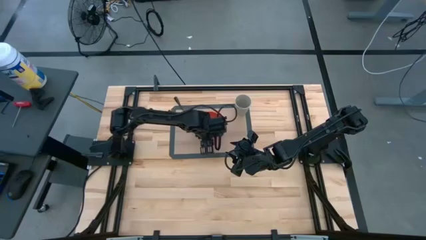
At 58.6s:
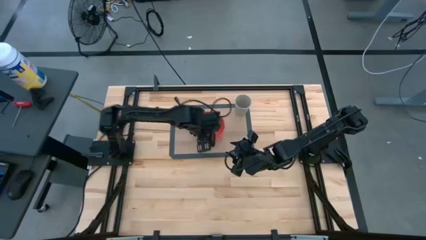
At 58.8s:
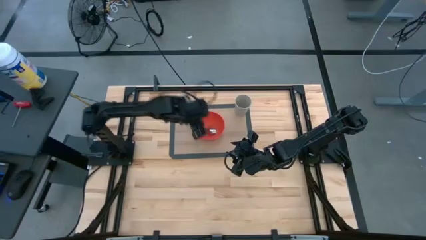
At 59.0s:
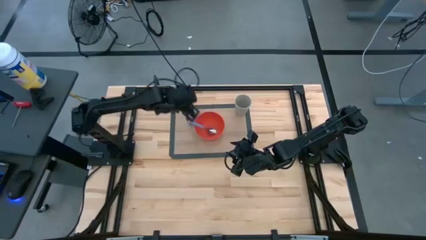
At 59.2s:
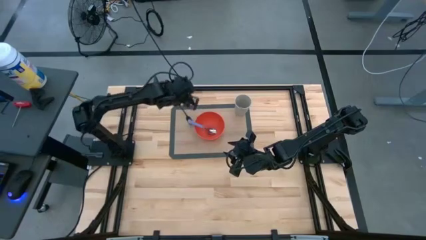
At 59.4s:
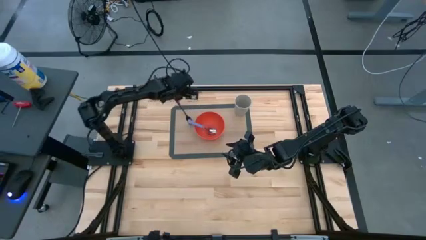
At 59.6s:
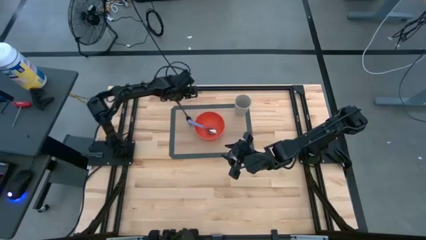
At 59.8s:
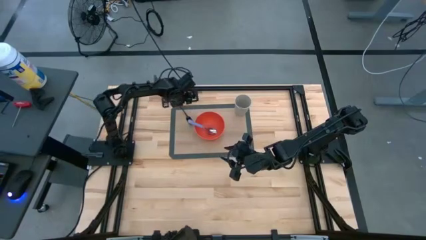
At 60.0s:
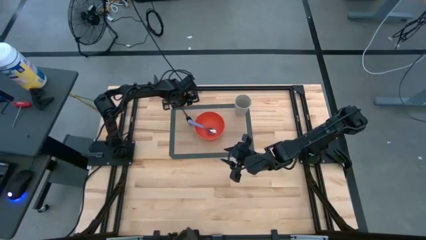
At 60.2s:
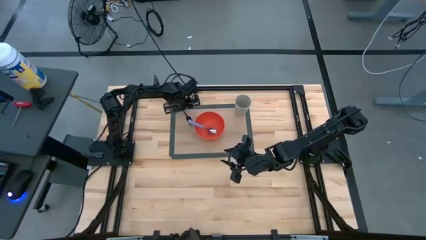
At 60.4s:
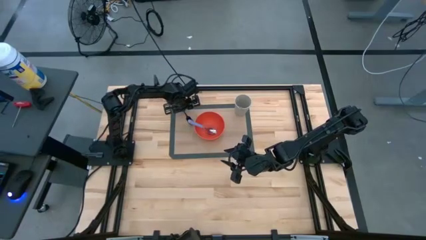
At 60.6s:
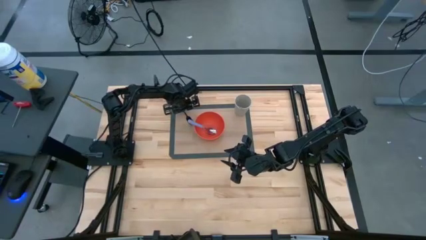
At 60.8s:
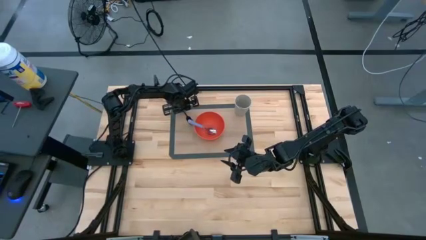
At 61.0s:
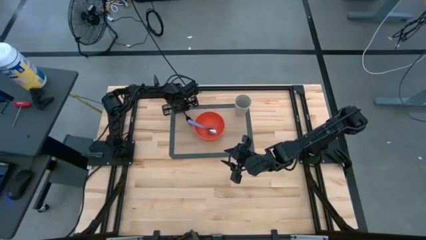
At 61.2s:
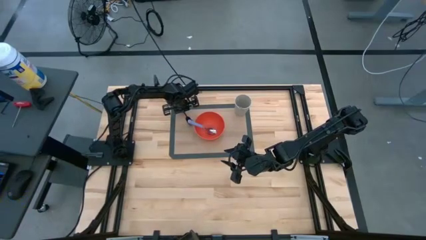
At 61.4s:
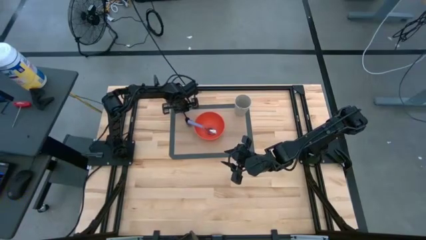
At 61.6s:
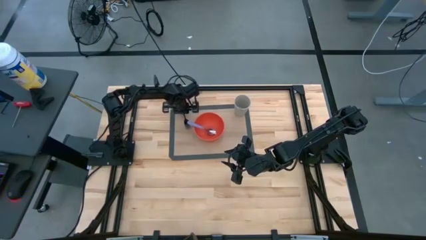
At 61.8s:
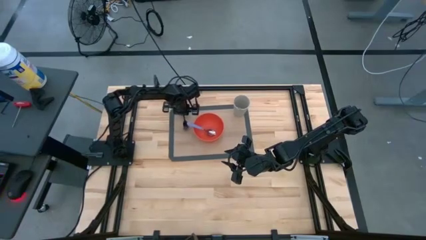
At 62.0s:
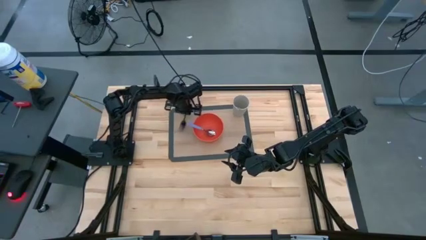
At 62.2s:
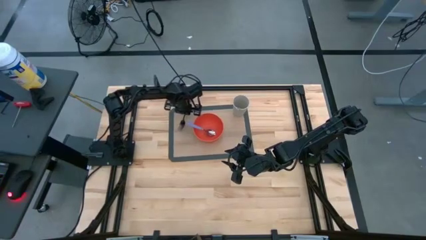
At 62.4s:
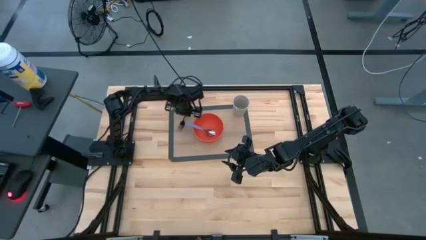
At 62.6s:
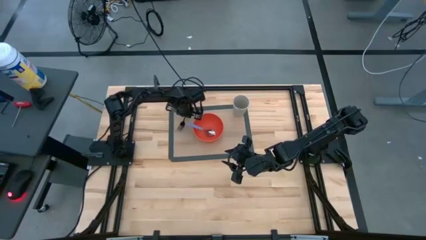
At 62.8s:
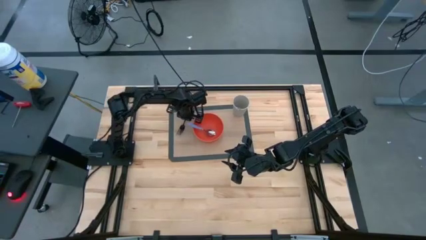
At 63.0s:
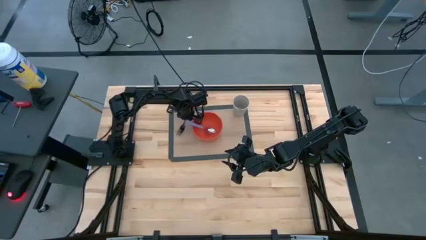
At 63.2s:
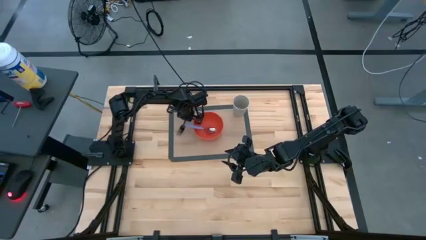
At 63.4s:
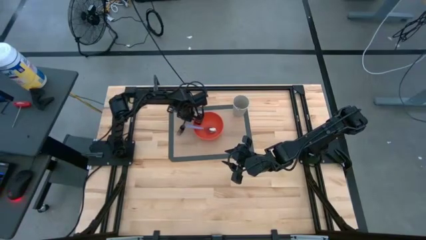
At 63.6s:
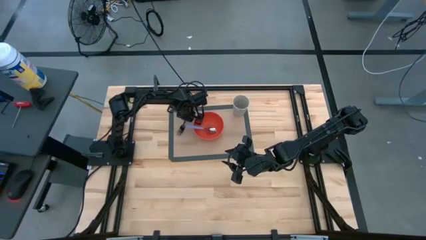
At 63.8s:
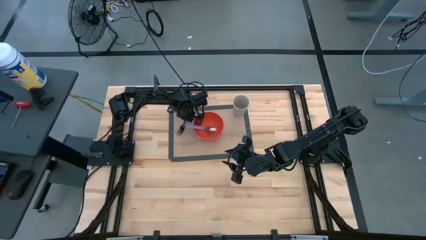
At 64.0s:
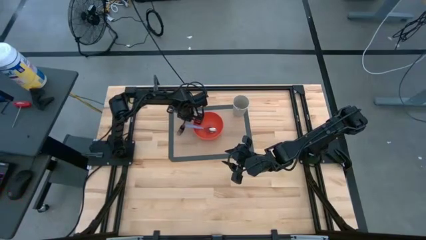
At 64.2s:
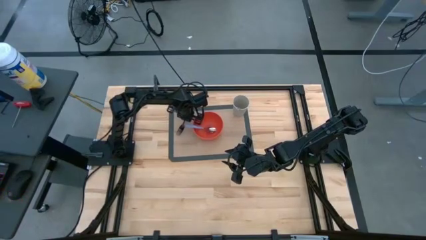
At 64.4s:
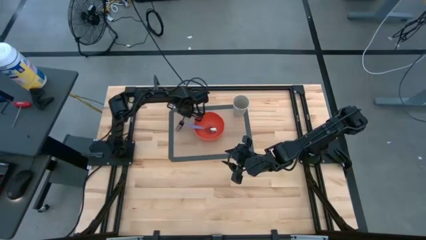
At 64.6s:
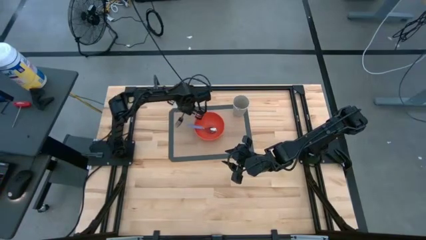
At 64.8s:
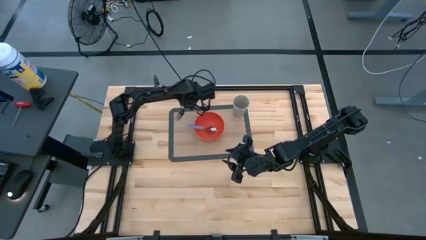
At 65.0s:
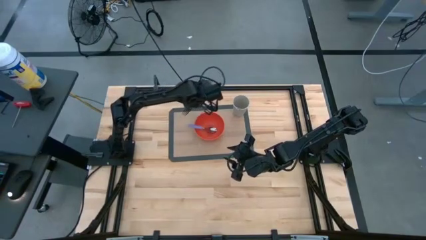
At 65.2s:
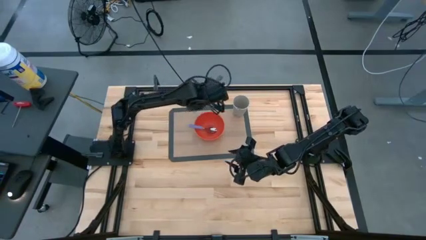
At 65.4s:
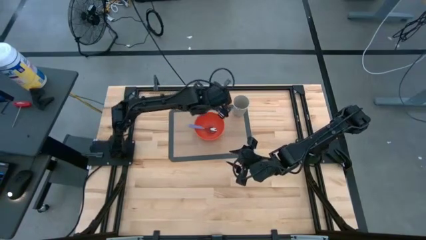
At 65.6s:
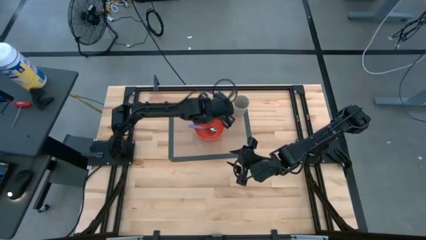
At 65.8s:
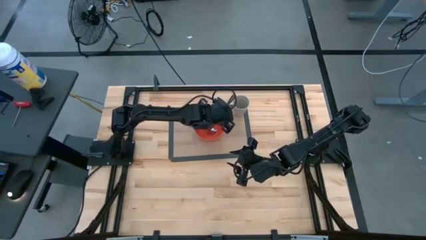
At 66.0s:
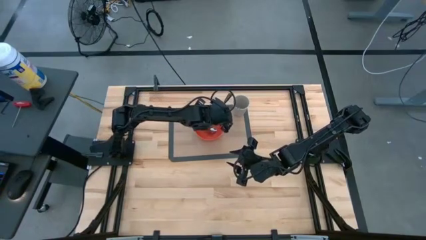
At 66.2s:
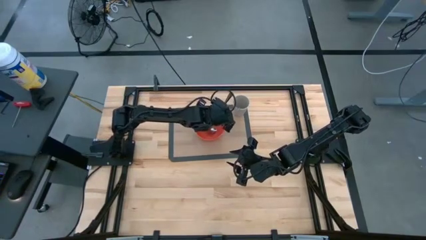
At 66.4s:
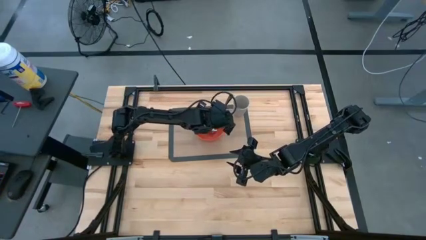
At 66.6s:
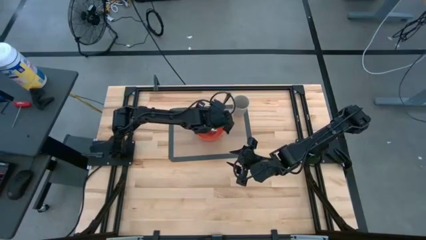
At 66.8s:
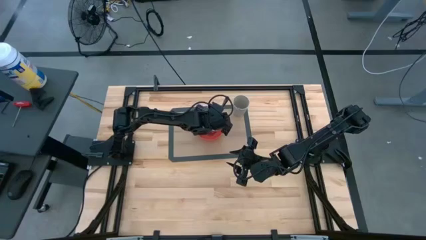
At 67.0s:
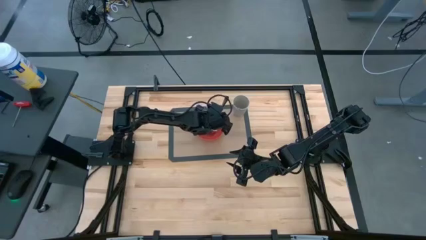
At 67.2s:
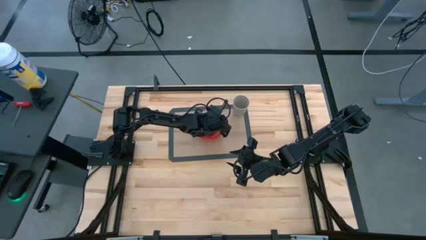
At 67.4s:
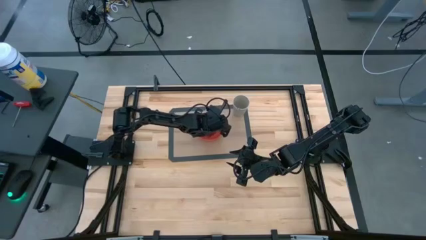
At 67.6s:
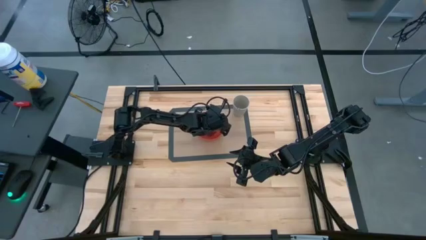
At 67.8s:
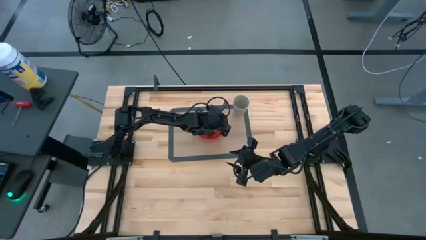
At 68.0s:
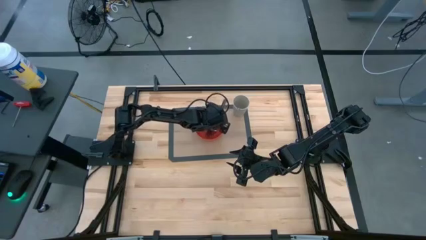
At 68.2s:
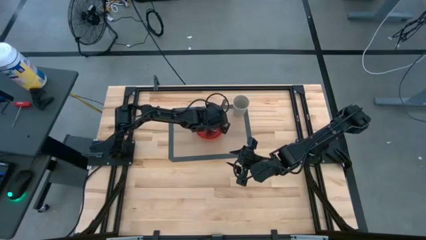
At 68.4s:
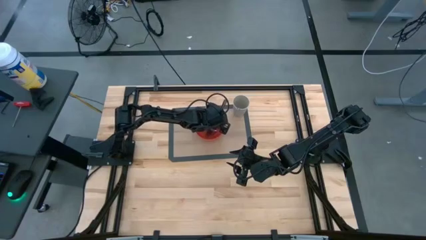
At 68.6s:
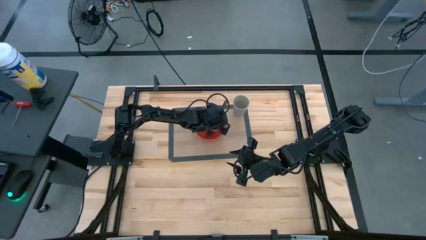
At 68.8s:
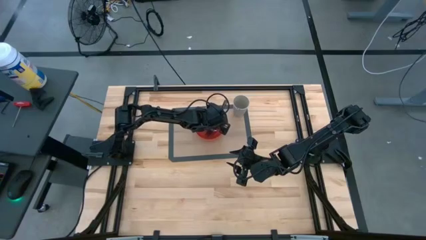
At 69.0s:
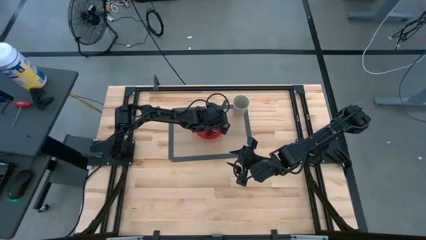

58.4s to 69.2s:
Task: Pick & Place Utensil
Put the black fork into the orange bowl

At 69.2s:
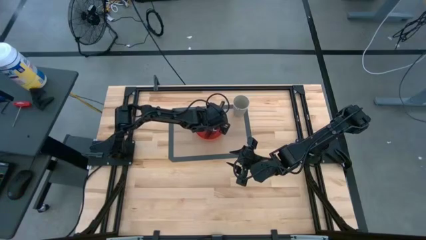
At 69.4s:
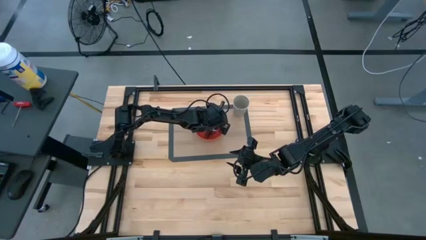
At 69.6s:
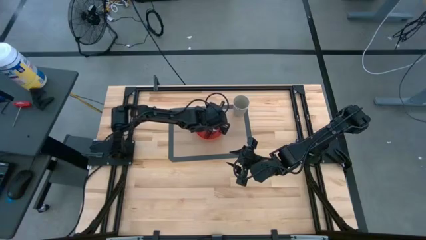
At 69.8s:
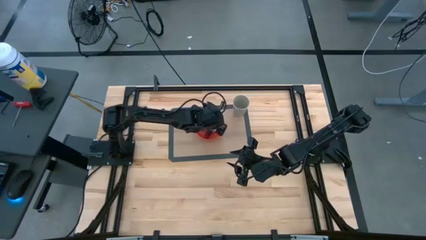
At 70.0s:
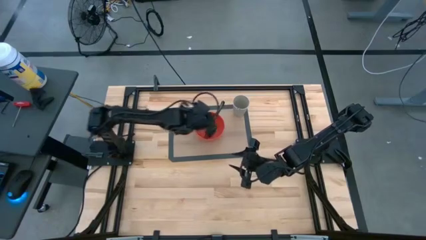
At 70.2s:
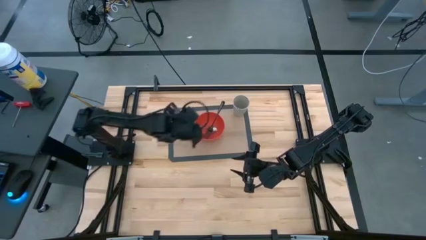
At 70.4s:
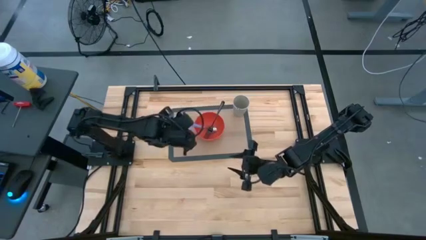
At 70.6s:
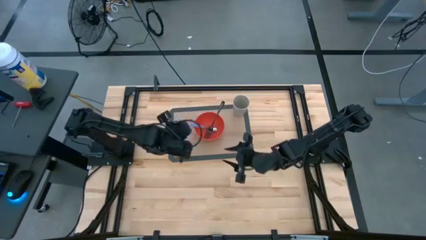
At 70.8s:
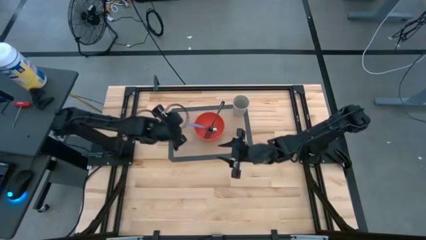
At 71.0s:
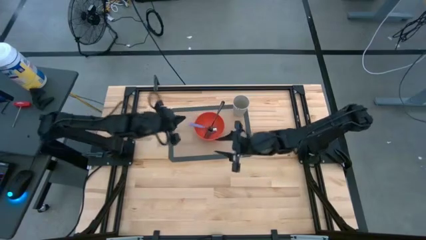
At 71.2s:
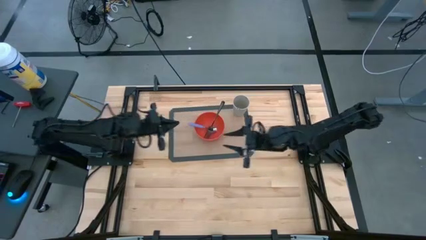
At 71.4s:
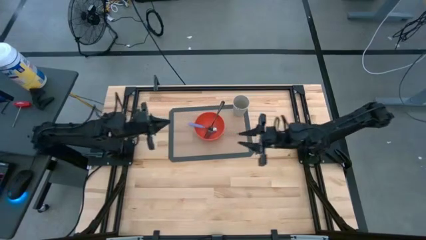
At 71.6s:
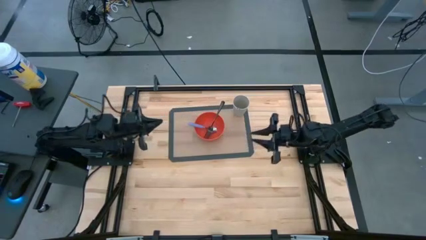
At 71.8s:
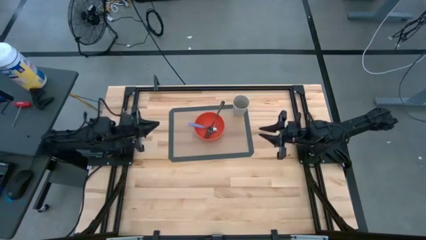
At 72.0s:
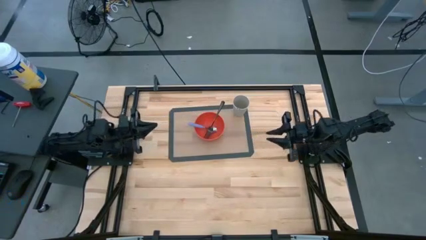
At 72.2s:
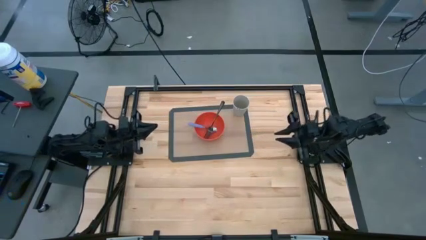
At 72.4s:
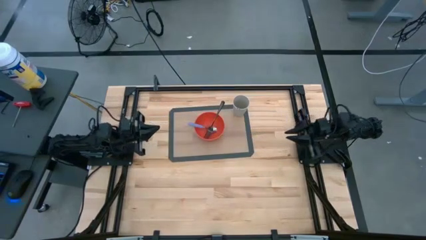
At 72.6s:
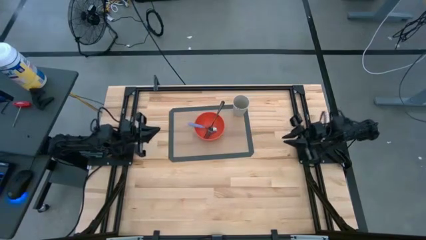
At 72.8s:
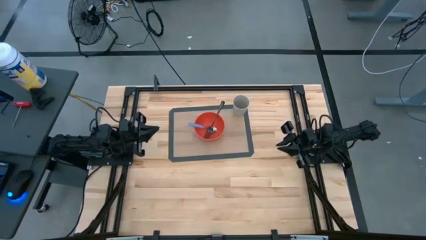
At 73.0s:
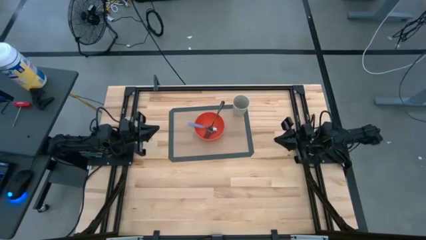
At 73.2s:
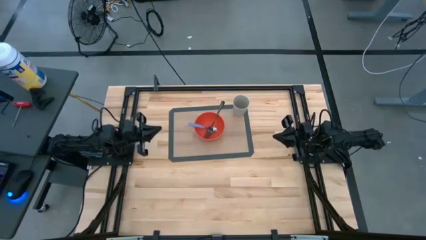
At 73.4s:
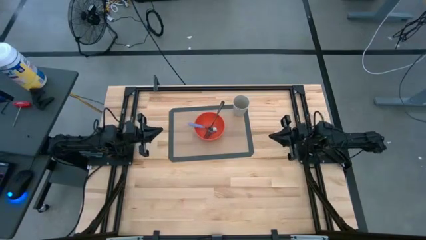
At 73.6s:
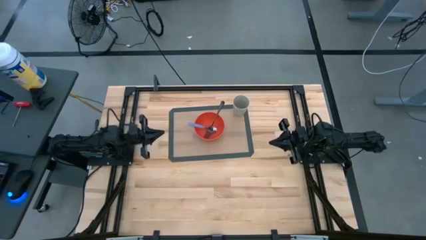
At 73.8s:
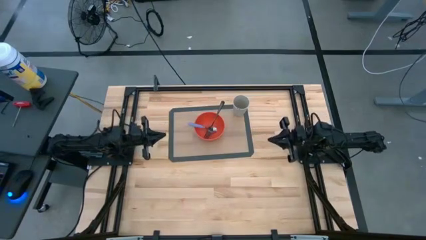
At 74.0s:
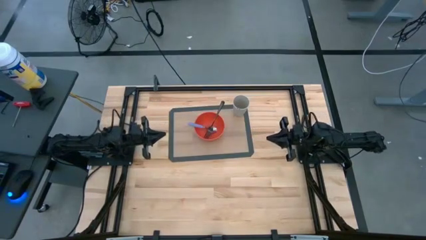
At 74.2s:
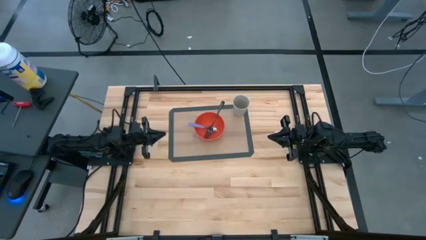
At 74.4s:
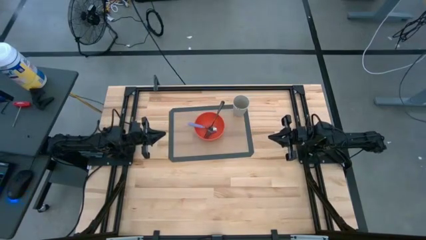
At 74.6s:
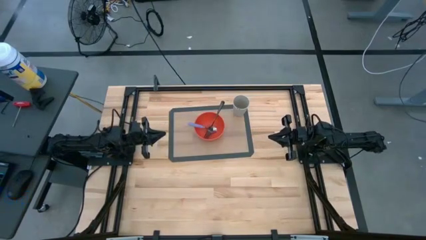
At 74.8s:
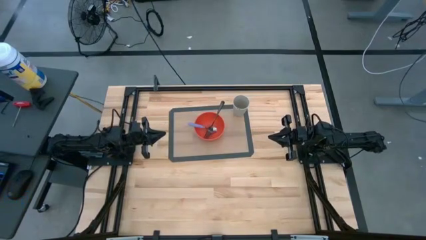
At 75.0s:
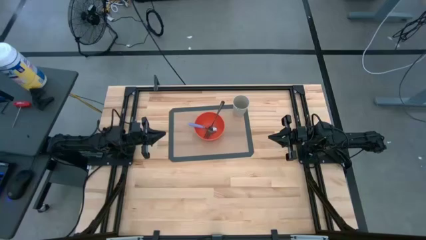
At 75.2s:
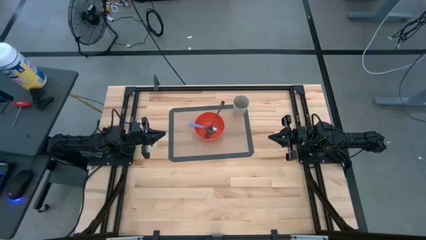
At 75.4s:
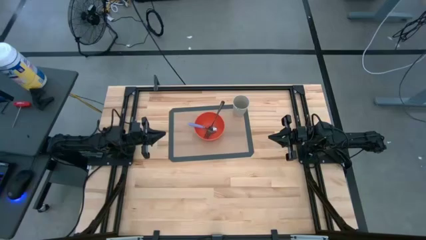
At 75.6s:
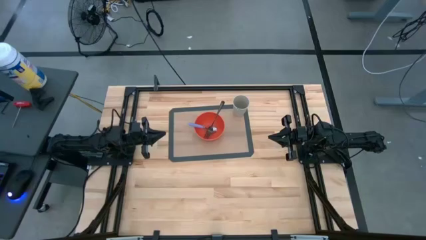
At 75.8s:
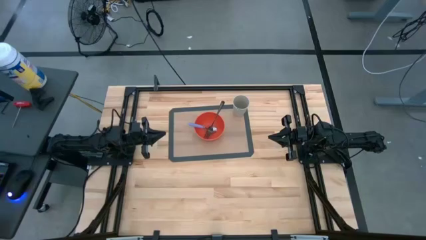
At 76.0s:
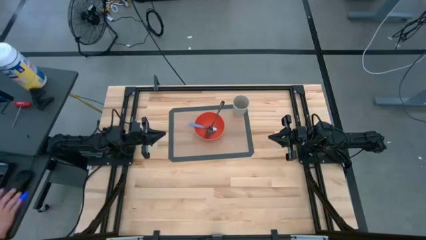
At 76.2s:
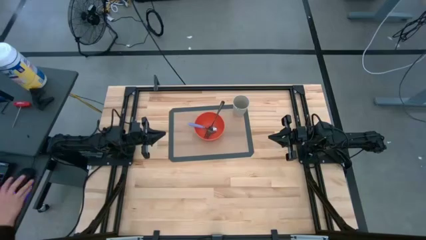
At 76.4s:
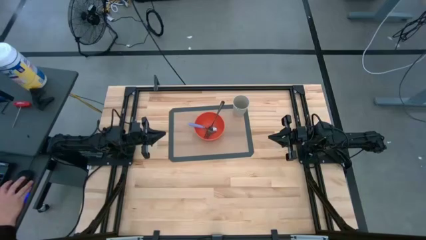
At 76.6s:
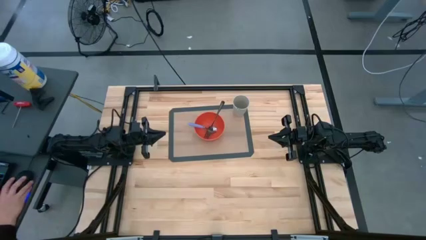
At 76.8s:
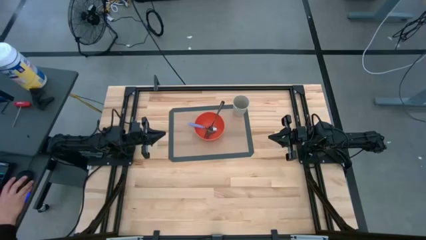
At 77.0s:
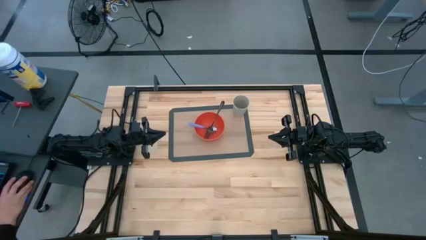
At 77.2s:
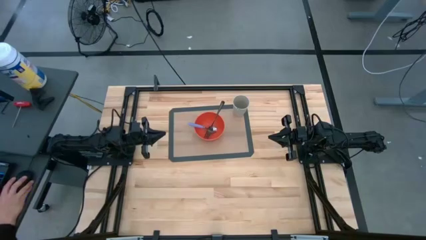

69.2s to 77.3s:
Return to Home Position
